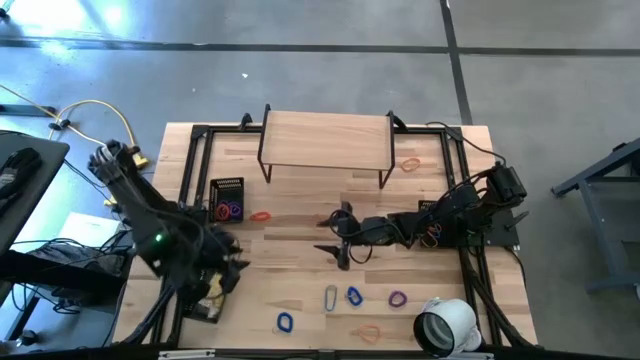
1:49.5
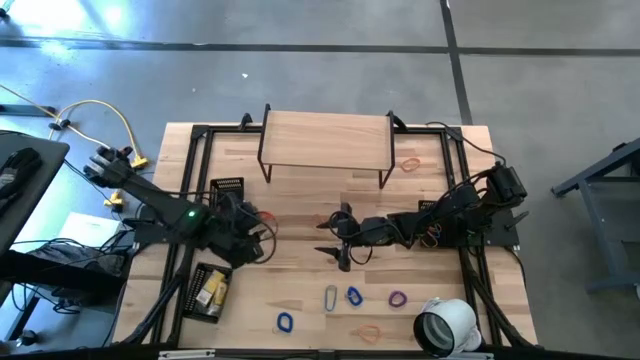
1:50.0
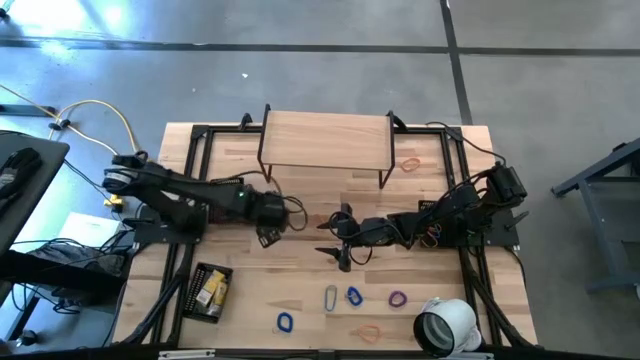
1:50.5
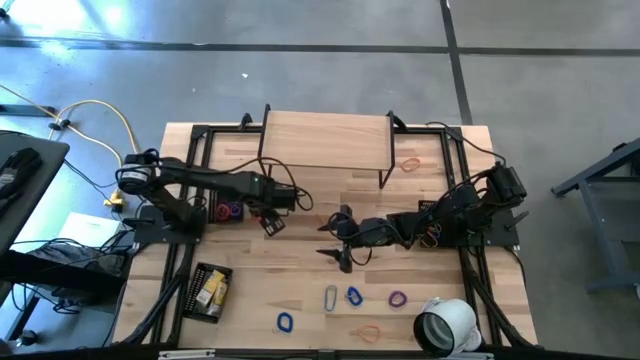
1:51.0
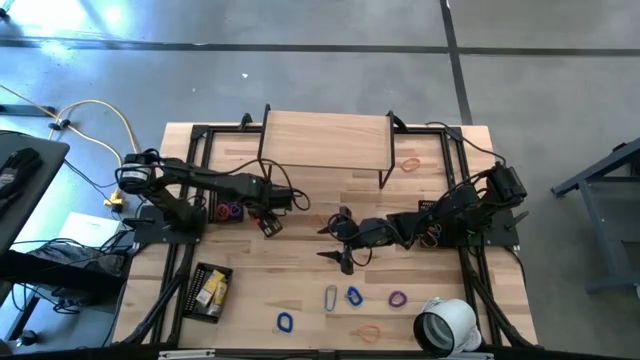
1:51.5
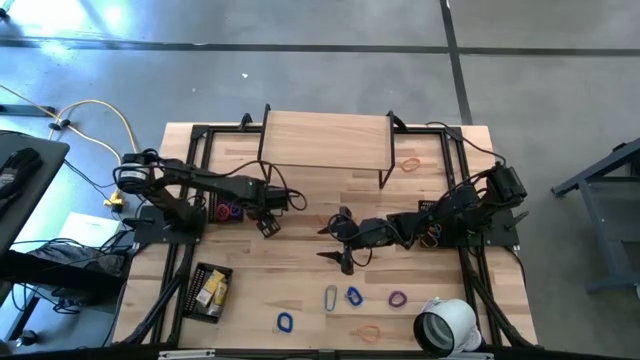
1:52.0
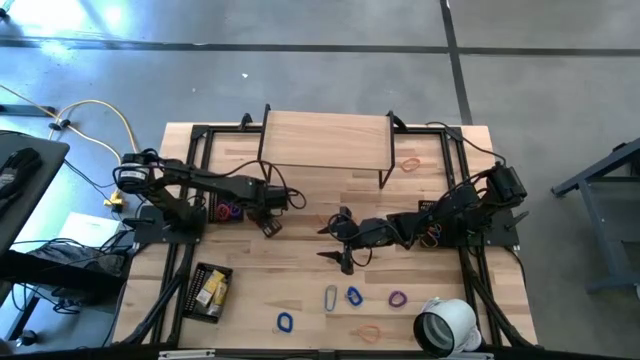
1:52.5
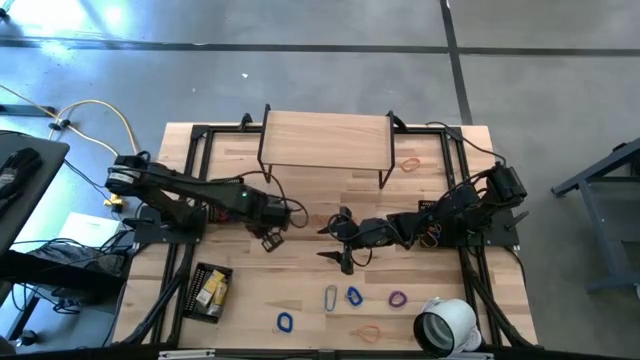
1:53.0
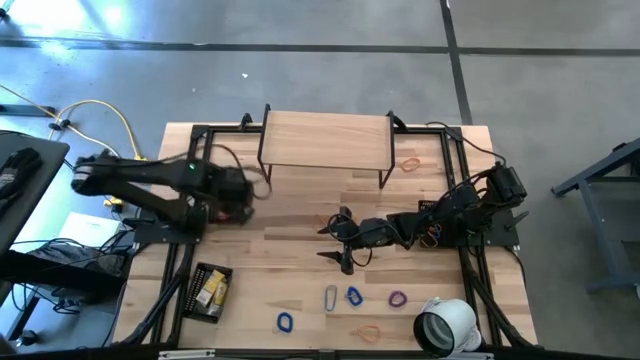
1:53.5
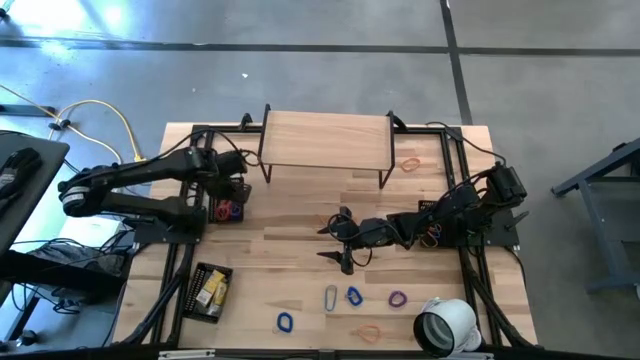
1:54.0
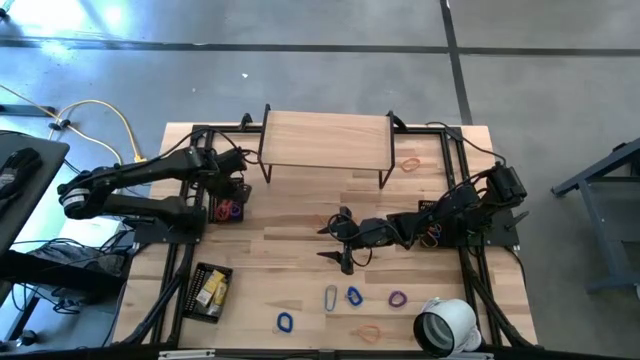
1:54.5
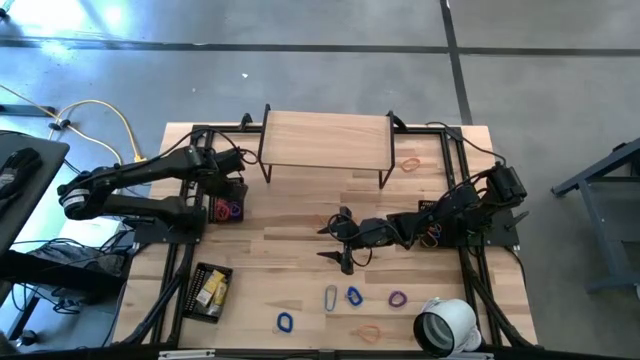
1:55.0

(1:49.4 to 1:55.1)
Task: Pick & Place Office Desk Supplies
Put the orange spring keychain into the top left black bin

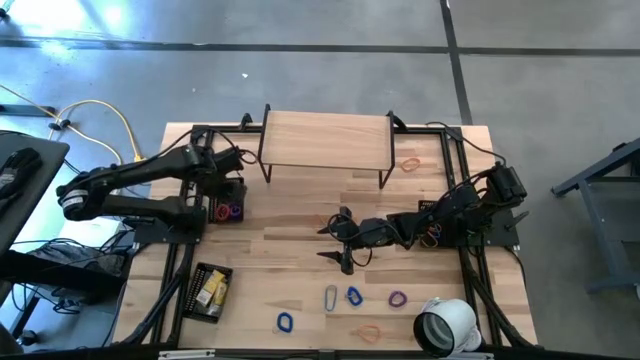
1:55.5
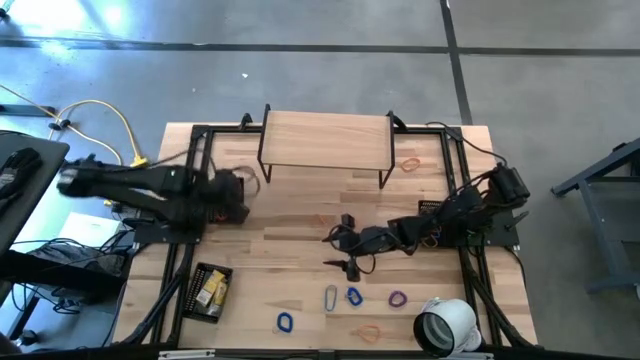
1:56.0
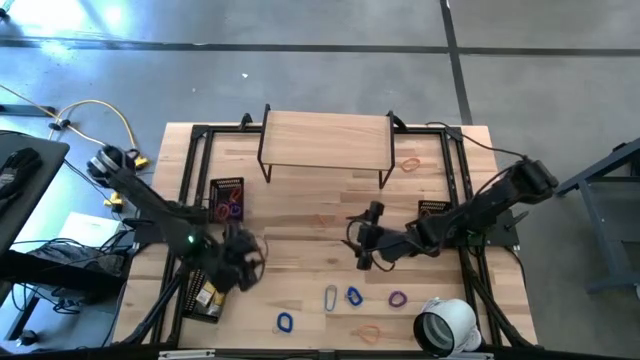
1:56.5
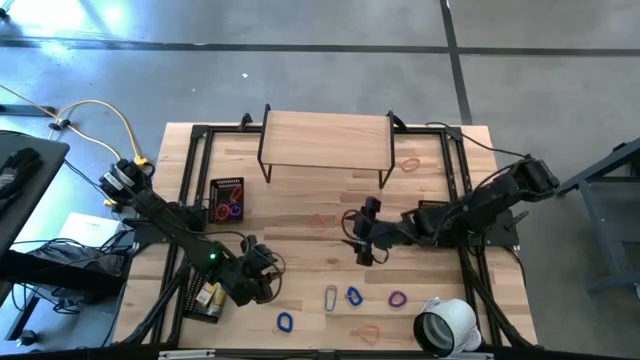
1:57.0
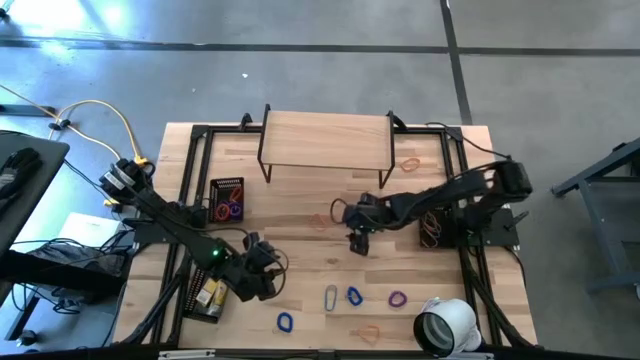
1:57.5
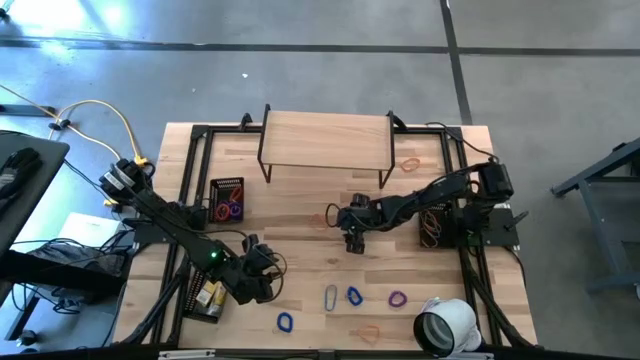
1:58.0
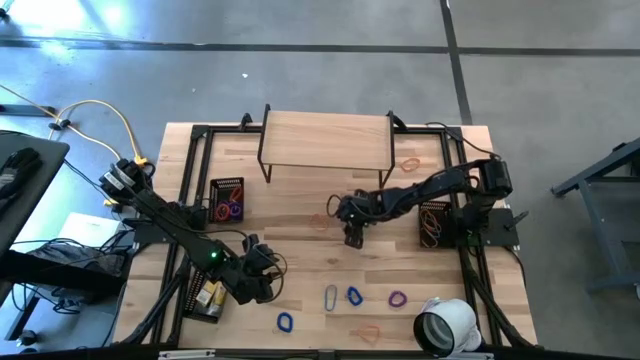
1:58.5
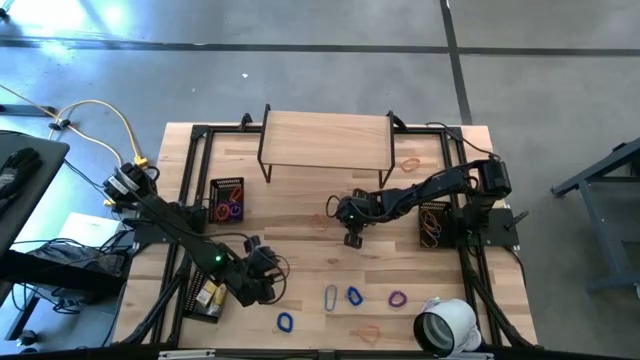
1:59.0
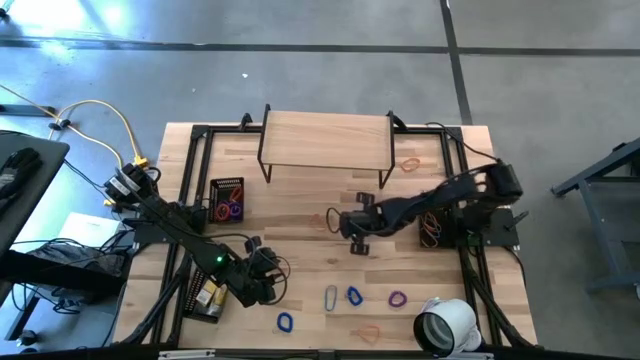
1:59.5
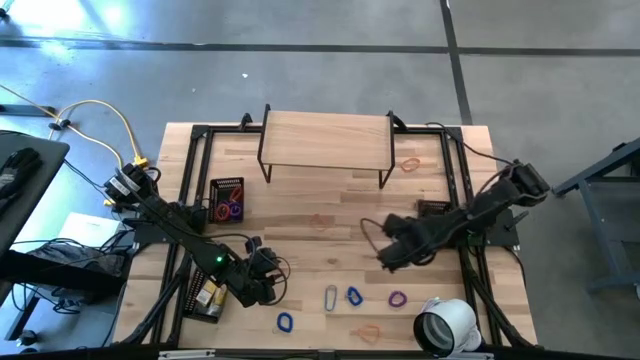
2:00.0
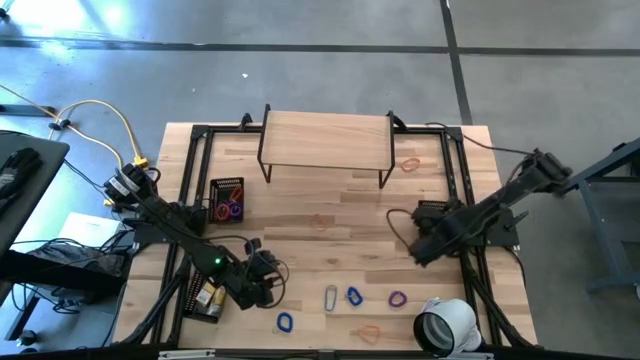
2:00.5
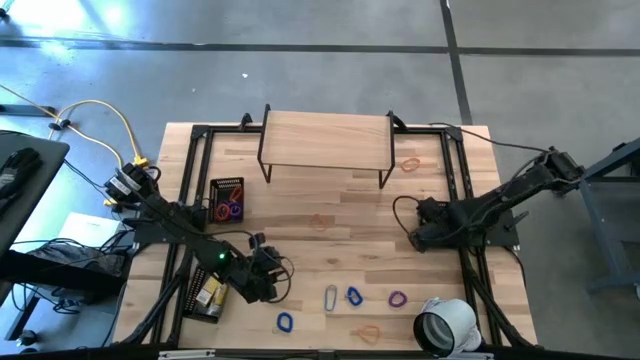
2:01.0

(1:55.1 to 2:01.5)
Put the orange rubber band into the top right black bin

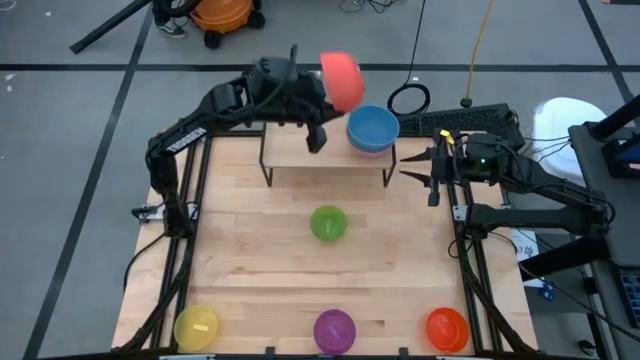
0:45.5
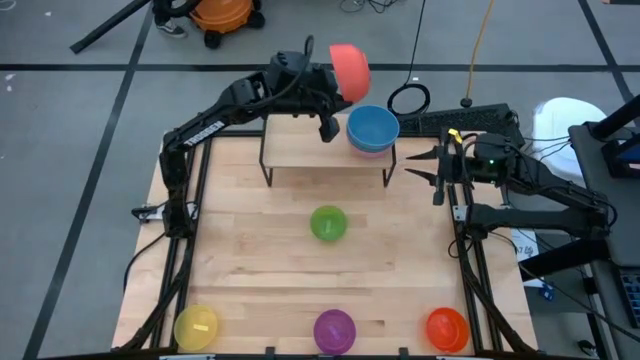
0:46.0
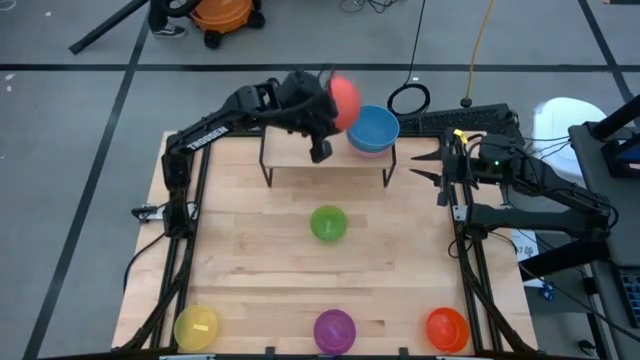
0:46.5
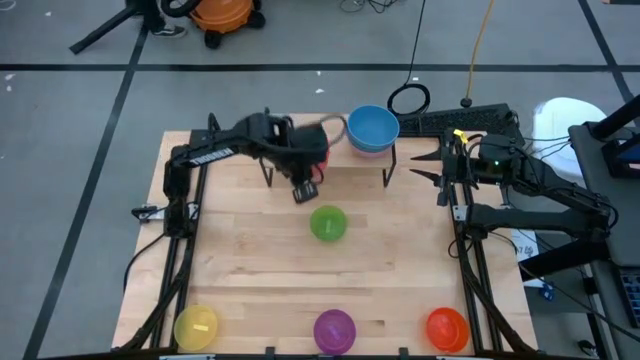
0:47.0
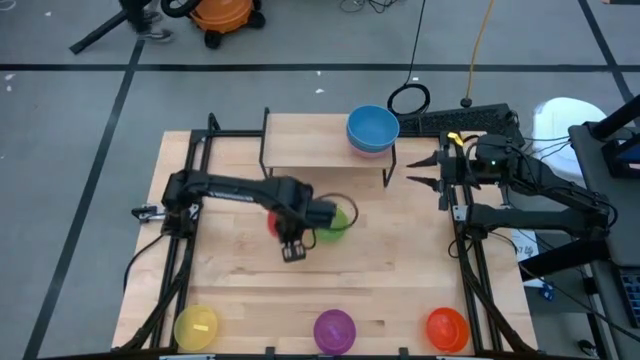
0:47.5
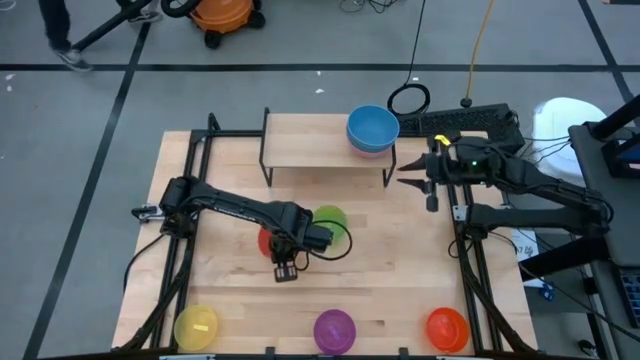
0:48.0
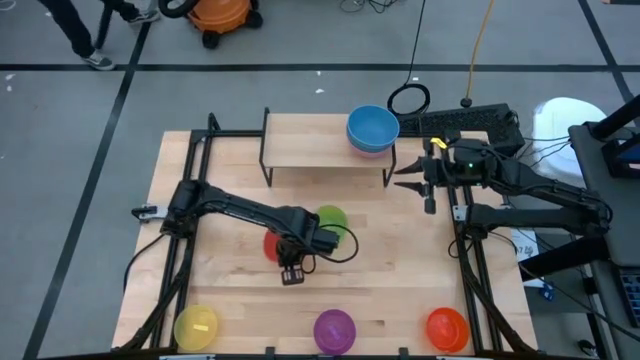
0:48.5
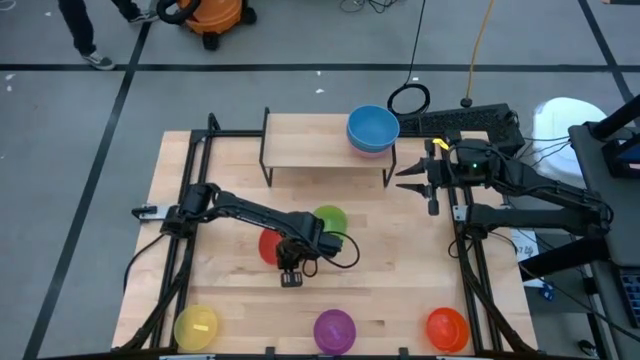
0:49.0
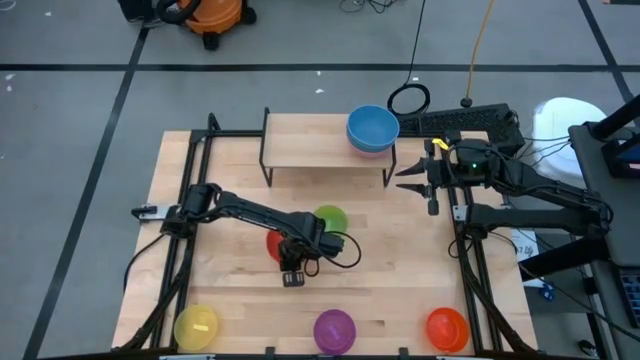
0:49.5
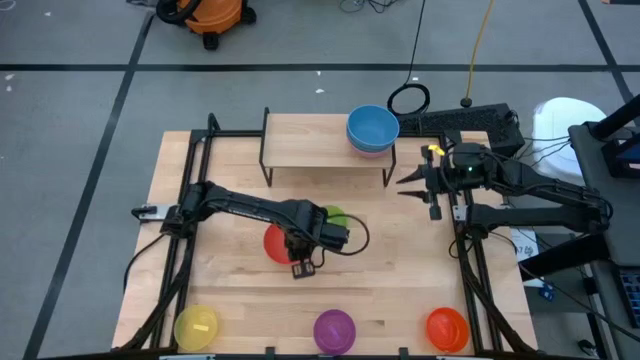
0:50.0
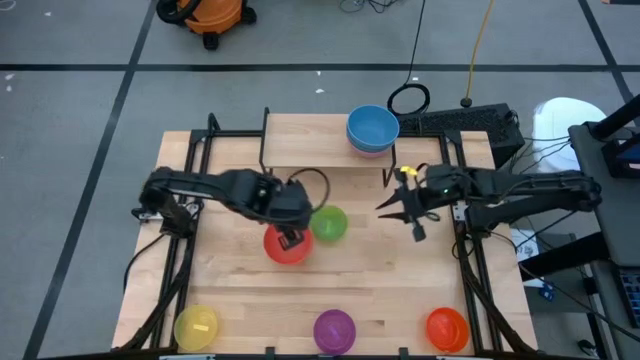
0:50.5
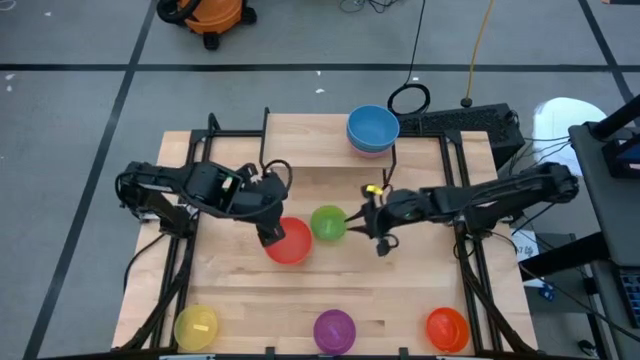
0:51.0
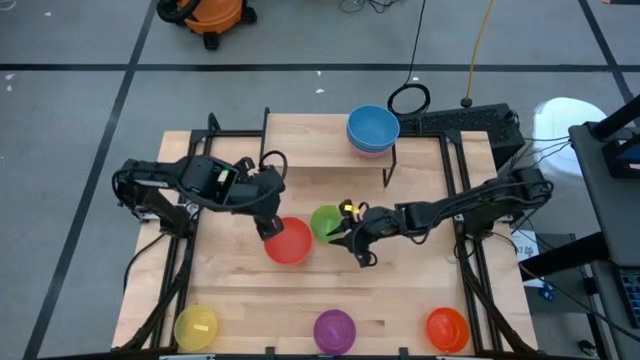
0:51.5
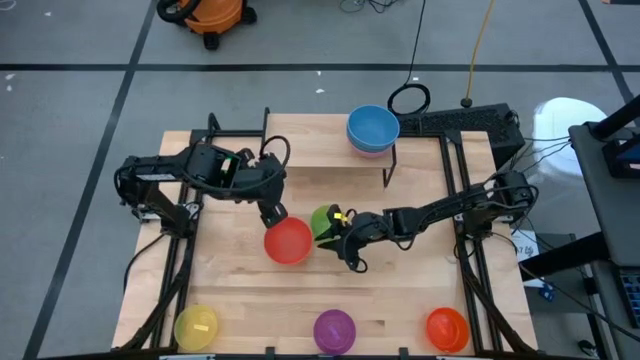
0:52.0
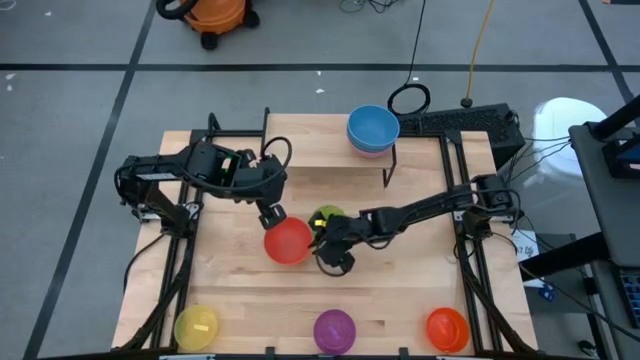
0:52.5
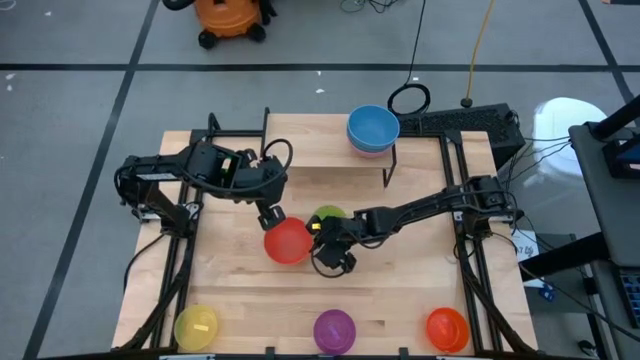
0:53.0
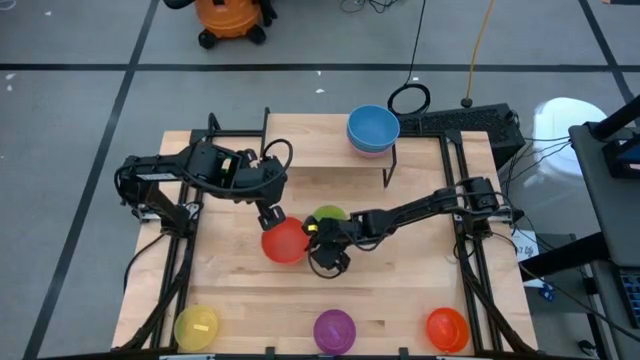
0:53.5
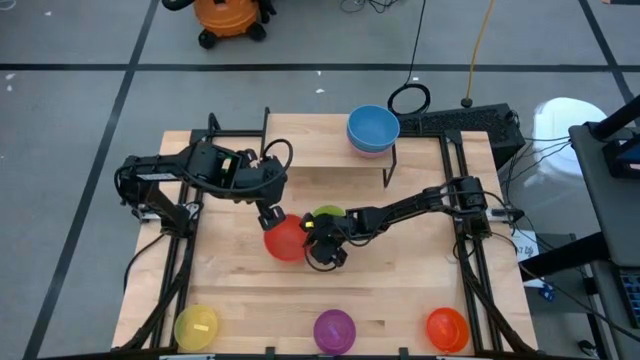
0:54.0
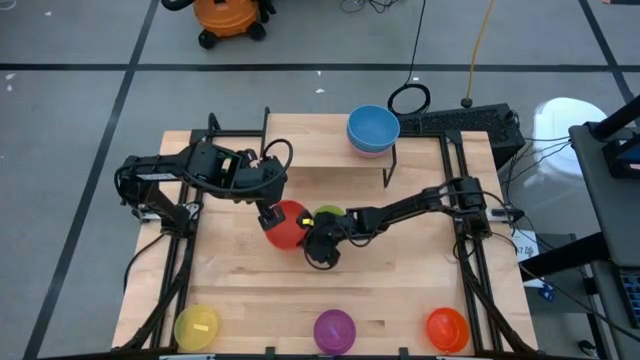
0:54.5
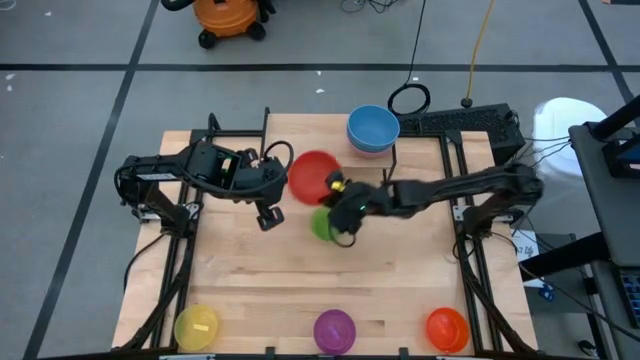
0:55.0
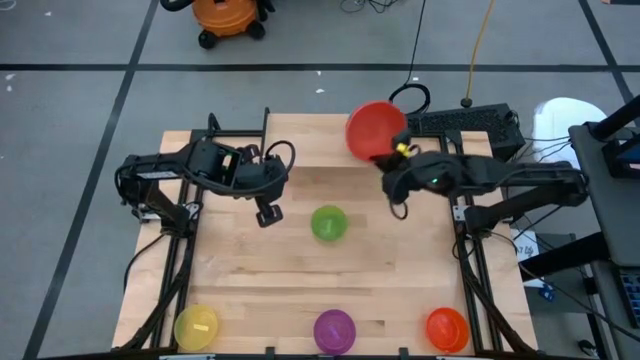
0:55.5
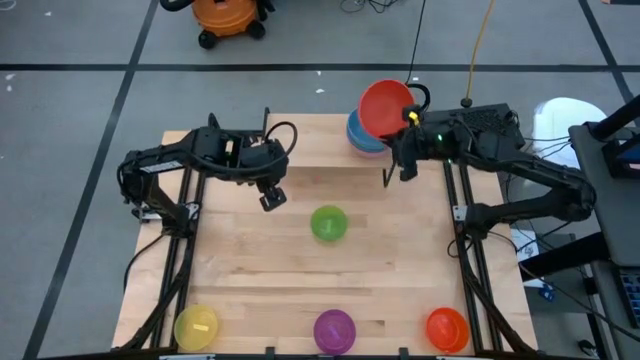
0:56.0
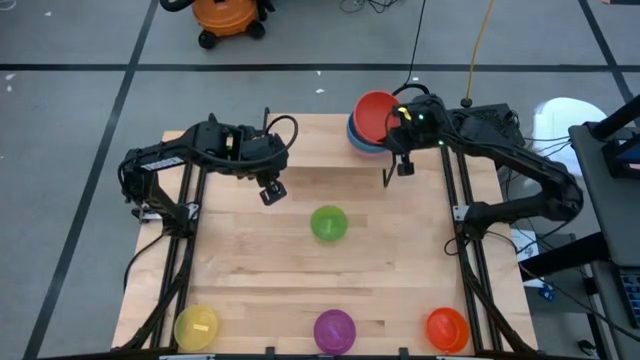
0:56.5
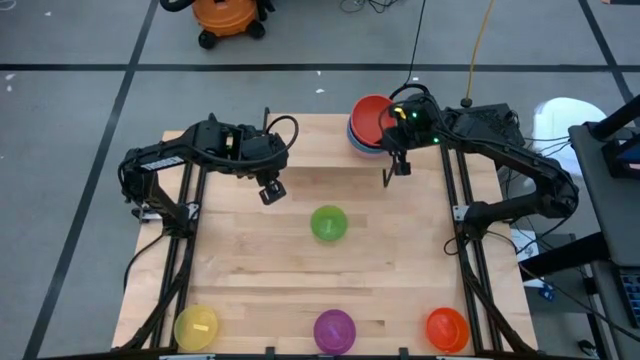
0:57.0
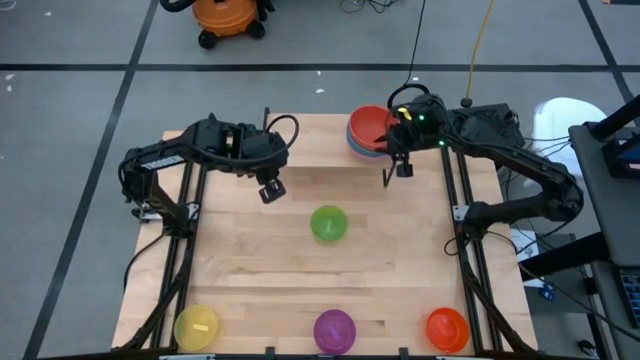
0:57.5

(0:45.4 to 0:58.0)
Task: Place and stack bowls onto a shelf
Stack the top orange bowl on top of the blue bowl on the shelf
